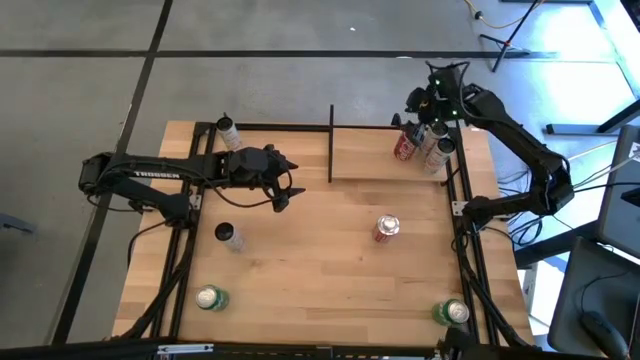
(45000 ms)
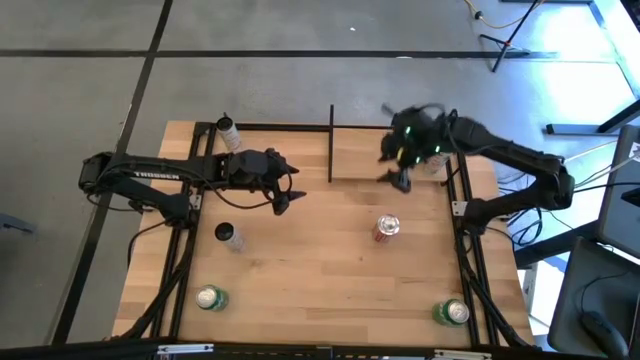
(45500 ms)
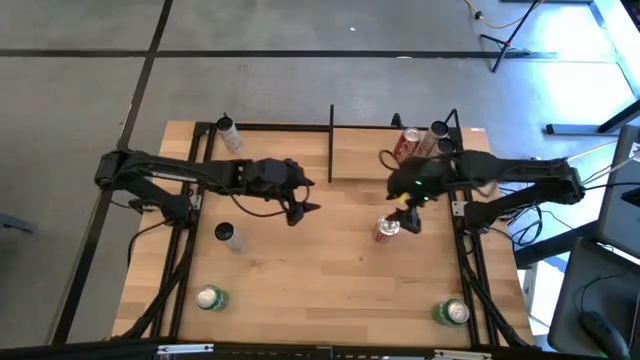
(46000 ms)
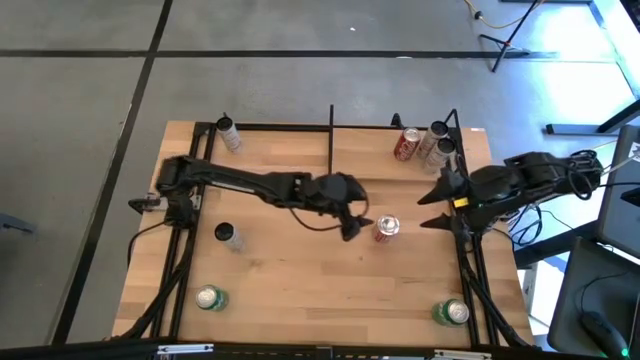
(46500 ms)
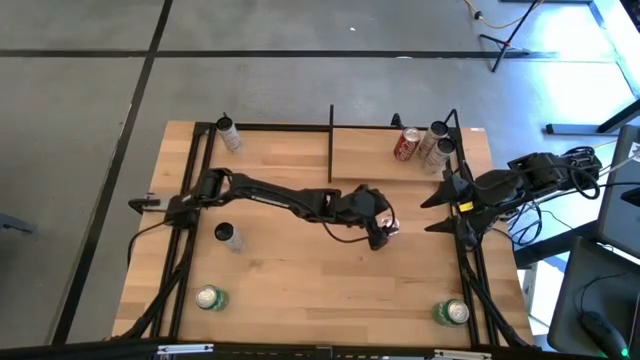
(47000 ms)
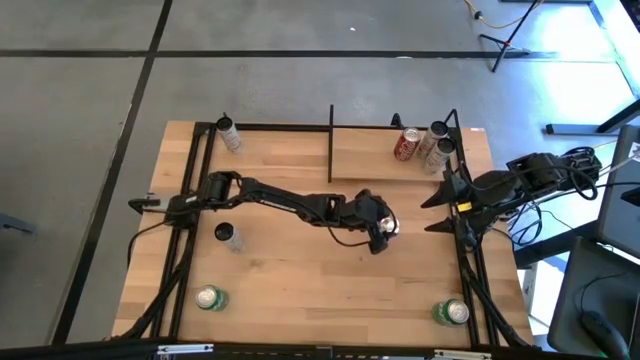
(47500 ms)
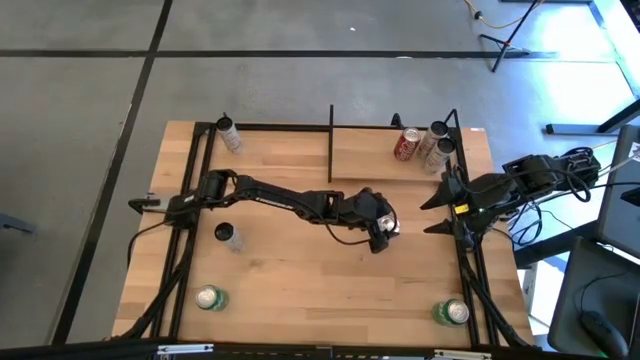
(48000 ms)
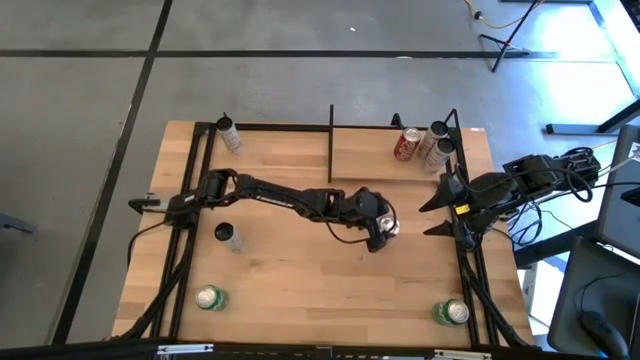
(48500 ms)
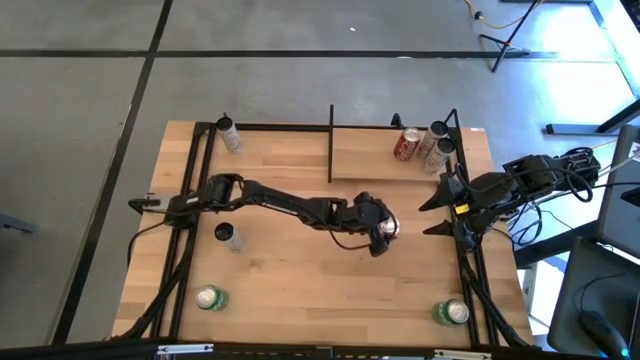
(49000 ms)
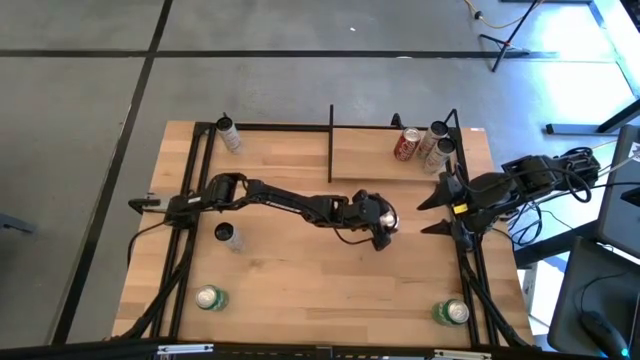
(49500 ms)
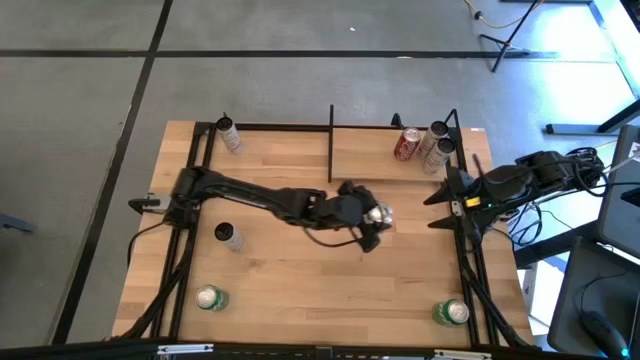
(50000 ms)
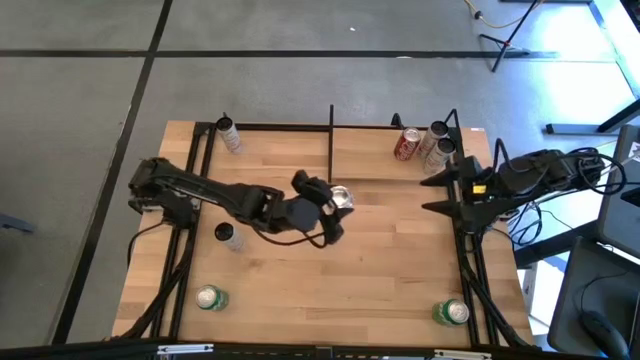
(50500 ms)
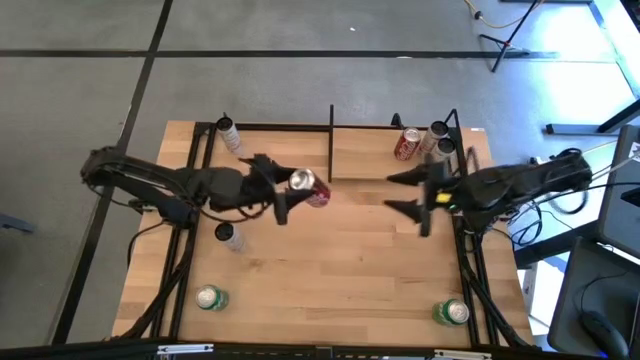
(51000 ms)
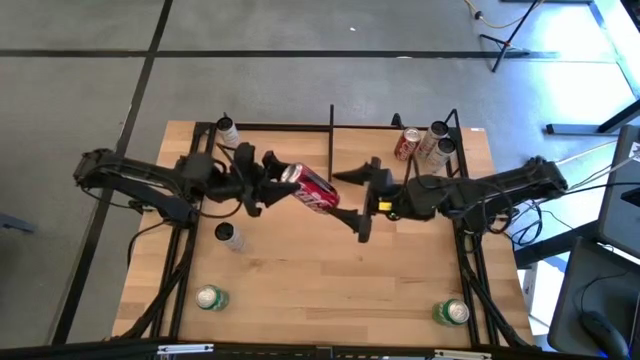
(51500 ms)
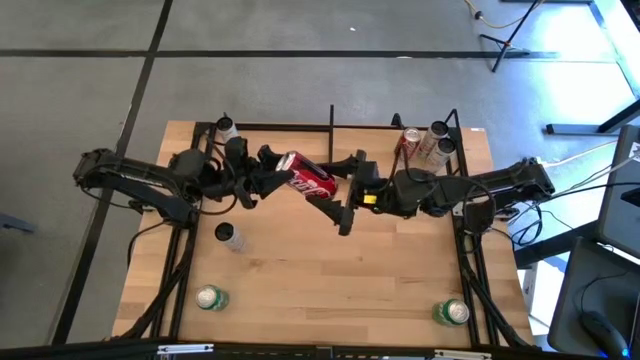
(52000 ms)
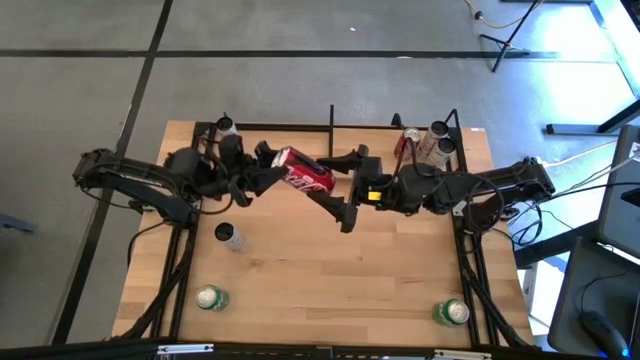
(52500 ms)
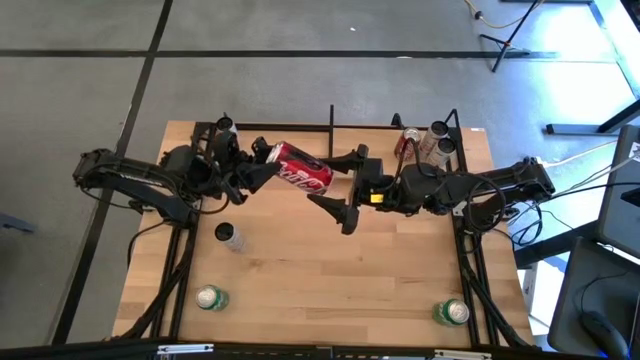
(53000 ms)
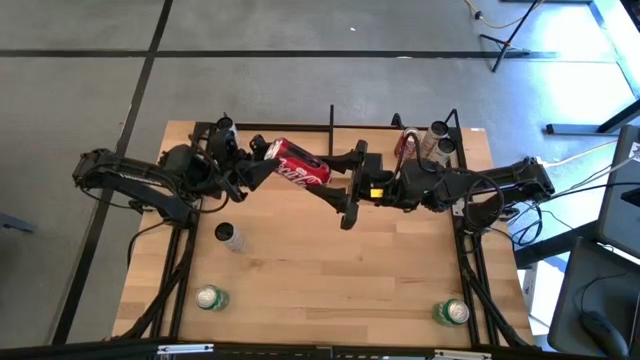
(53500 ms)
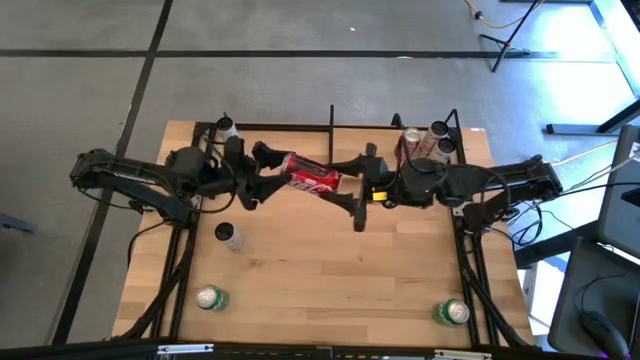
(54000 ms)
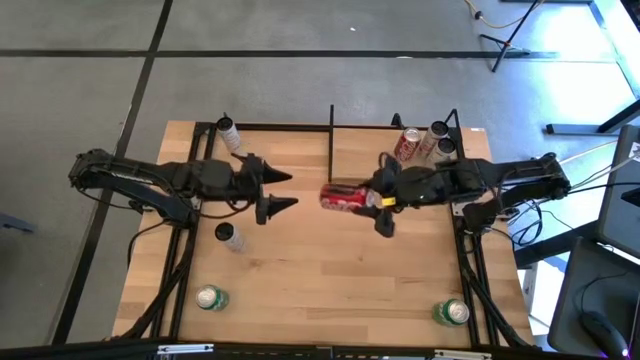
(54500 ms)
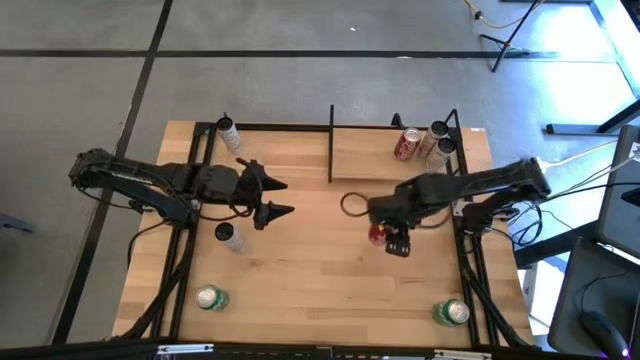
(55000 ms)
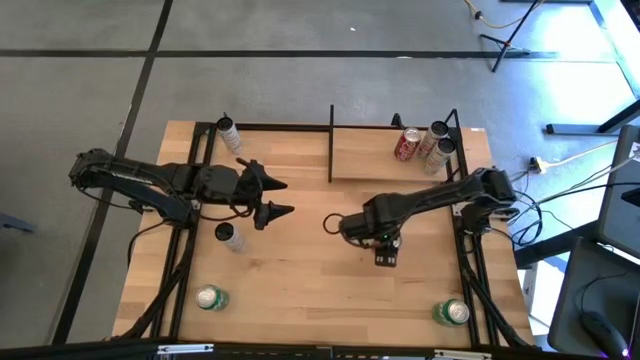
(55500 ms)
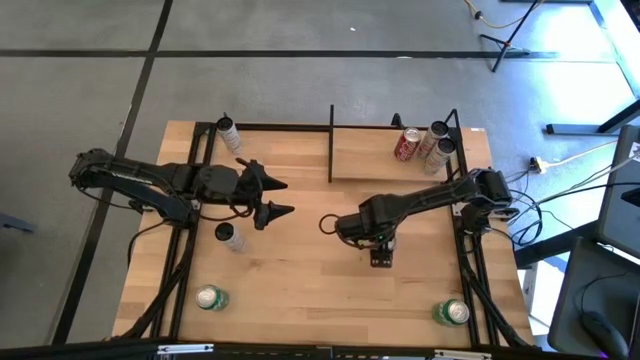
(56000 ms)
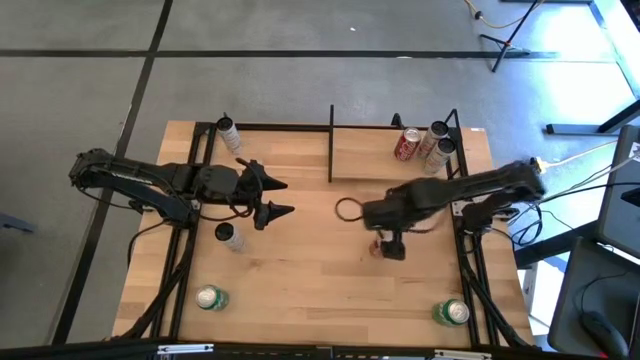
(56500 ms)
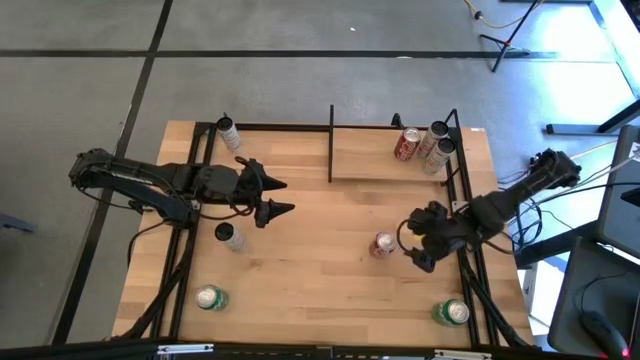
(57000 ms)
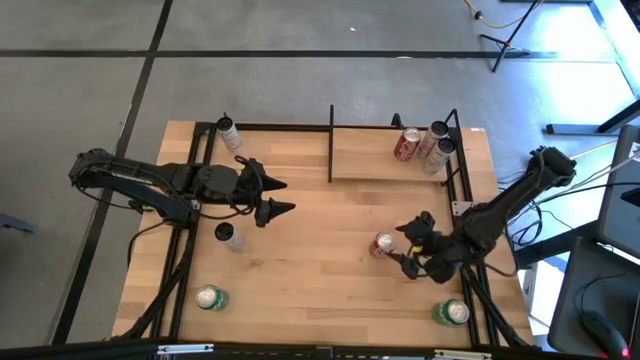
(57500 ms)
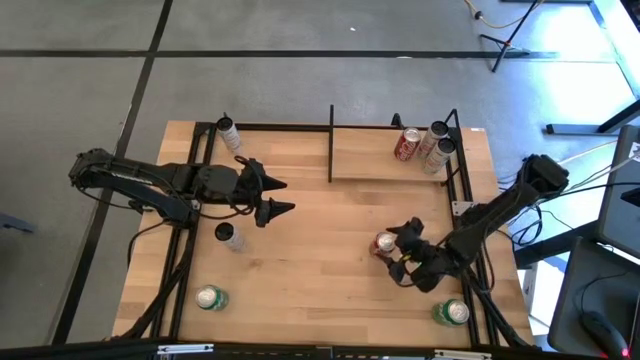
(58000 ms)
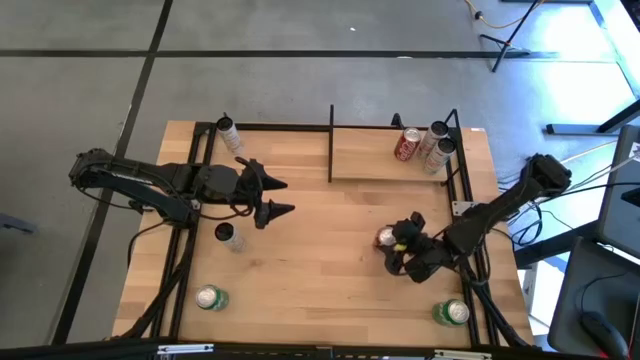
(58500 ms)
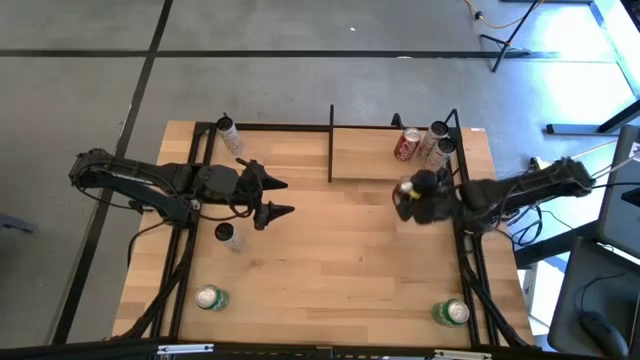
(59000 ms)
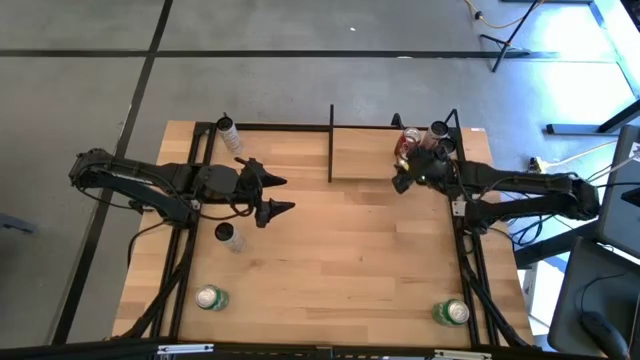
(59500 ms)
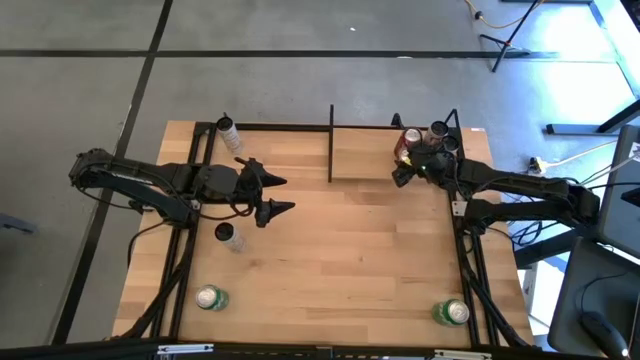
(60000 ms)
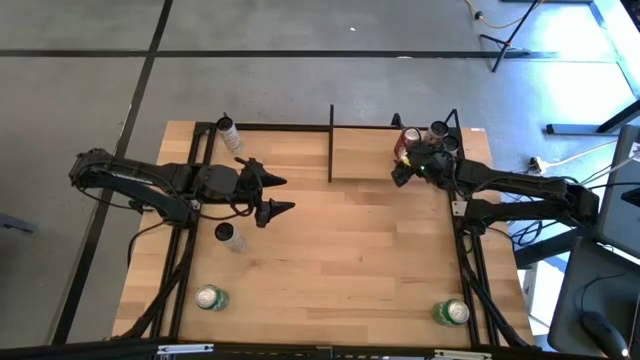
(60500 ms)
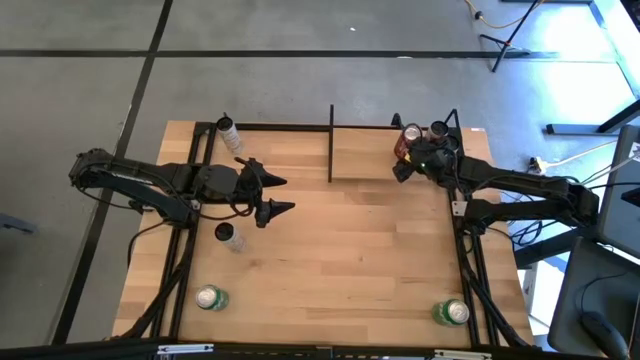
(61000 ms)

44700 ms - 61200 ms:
Task: Place canned beverage on shelf
Put the red soda can on the shelf aligned with the other red soda can

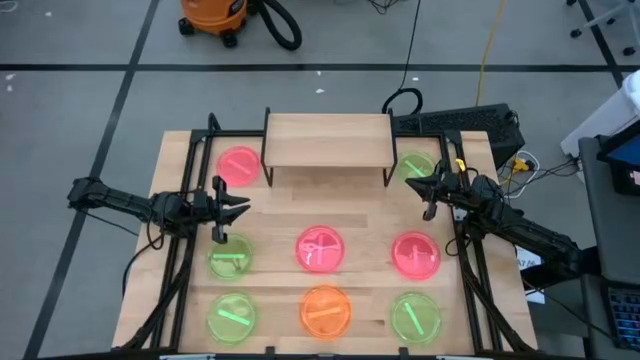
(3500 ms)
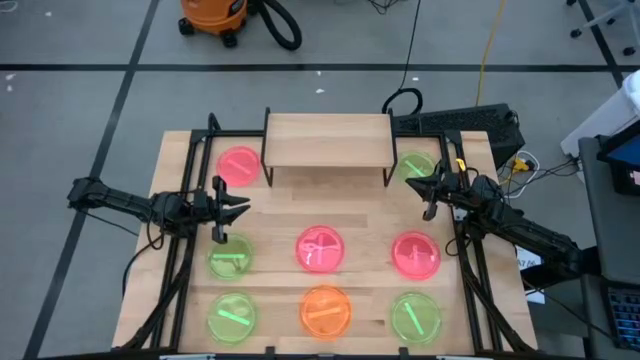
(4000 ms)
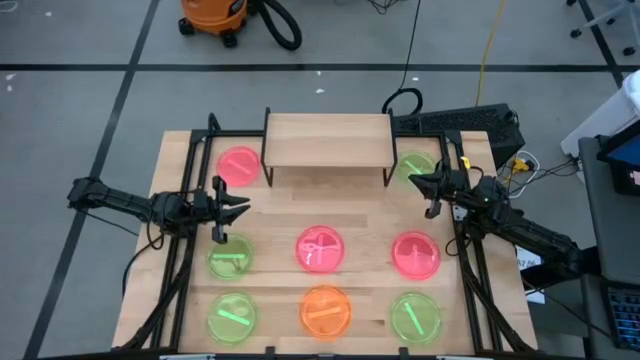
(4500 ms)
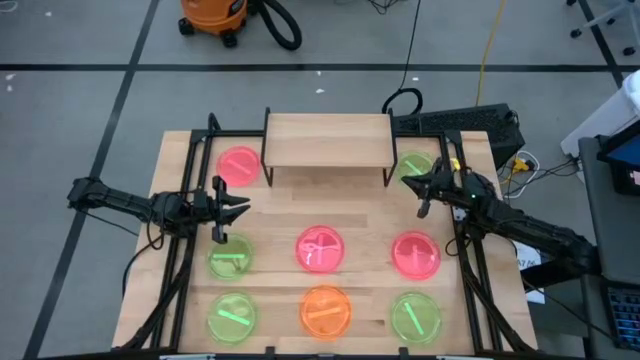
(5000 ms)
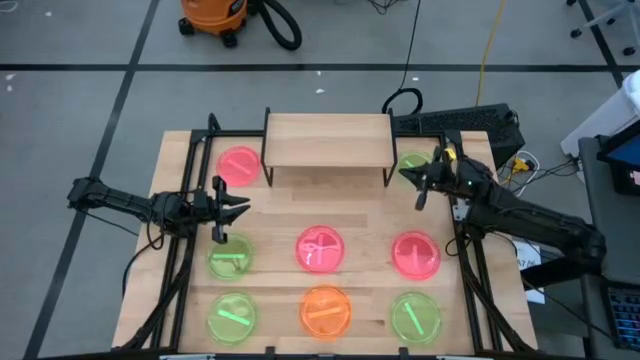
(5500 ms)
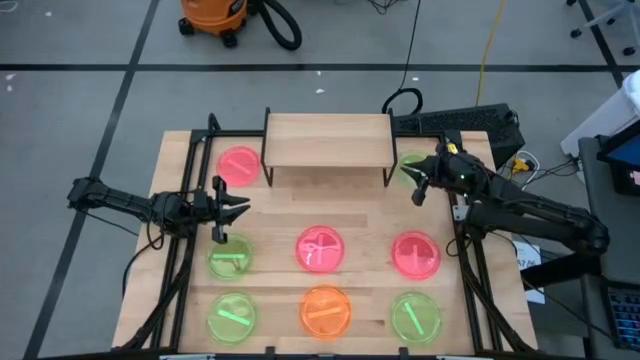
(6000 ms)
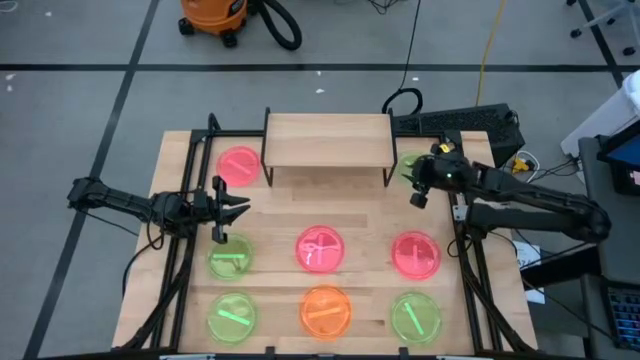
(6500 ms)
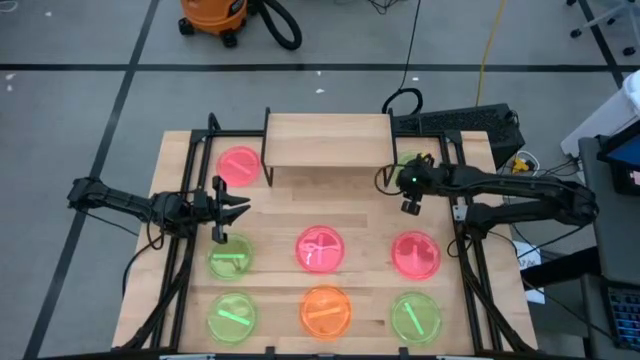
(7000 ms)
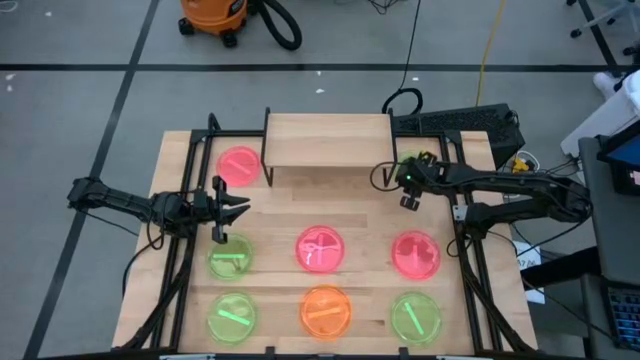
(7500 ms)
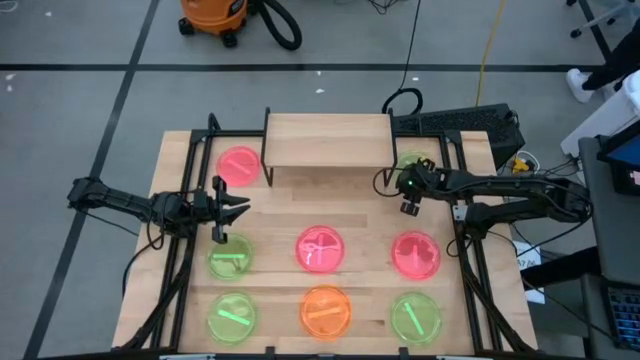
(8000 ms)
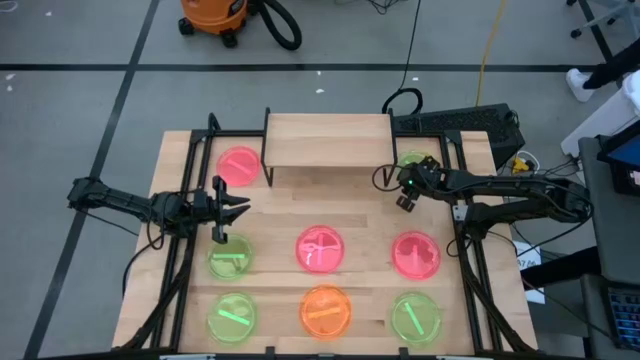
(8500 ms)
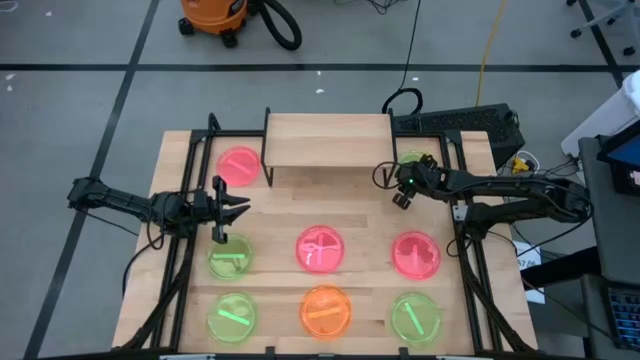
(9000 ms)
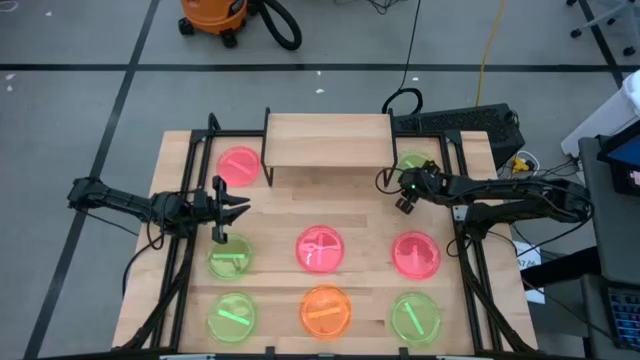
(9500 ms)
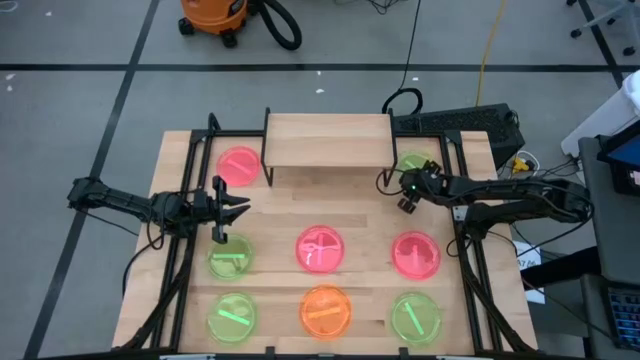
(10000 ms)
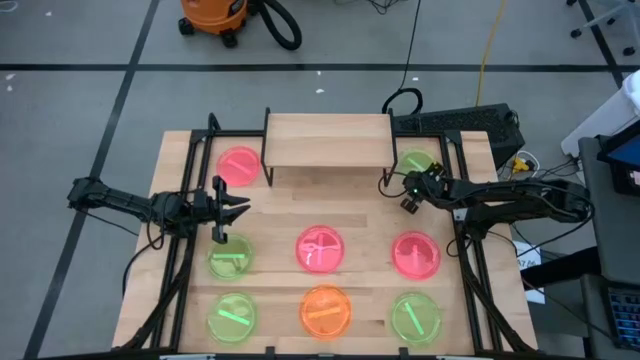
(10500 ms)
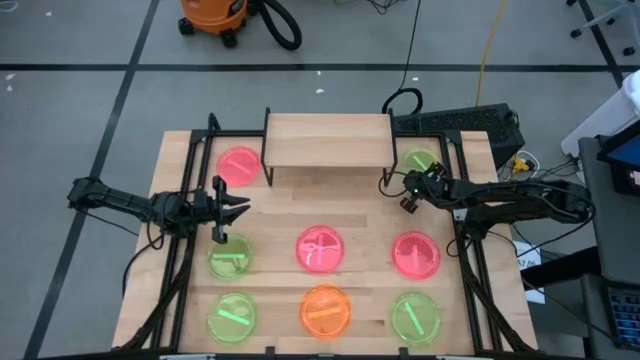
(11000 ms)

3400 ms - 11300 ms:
Task: Place and stack plates onto a shelf
Put the green plate on the shelf
